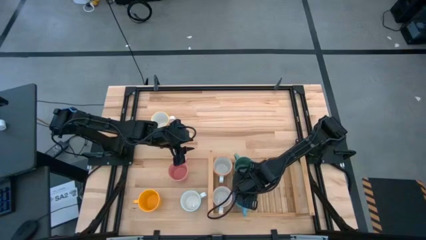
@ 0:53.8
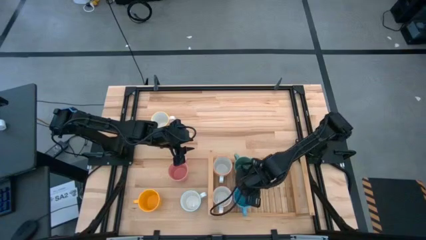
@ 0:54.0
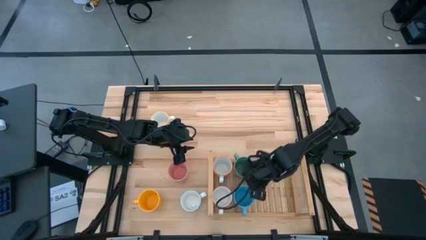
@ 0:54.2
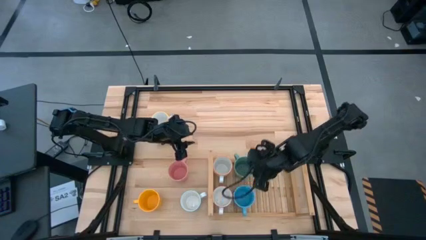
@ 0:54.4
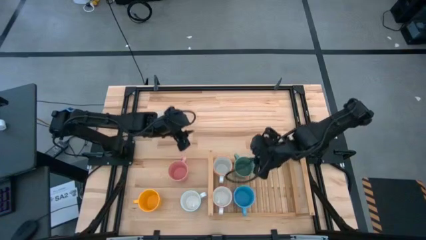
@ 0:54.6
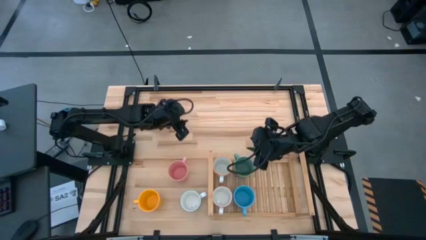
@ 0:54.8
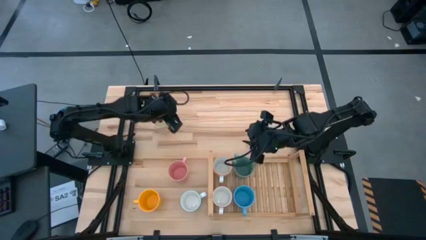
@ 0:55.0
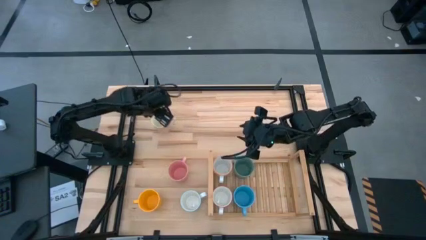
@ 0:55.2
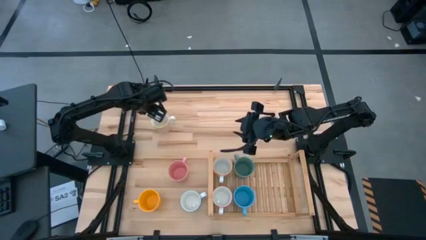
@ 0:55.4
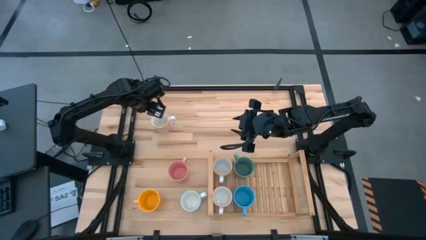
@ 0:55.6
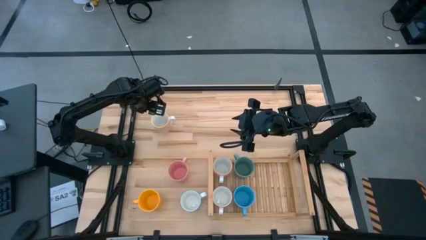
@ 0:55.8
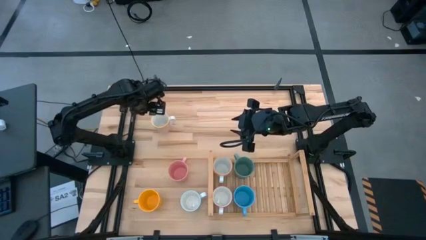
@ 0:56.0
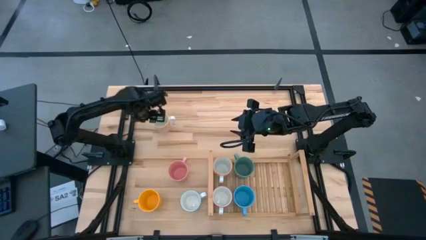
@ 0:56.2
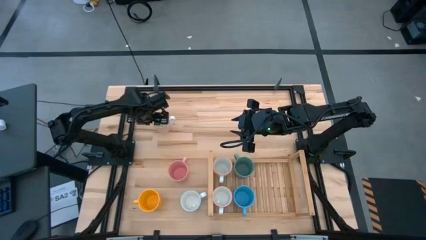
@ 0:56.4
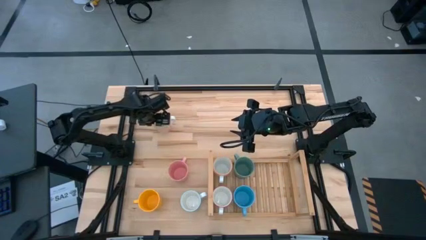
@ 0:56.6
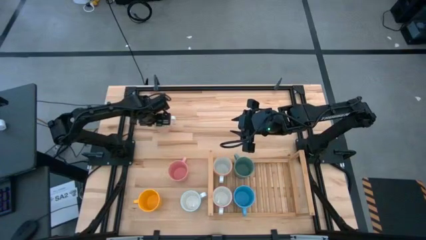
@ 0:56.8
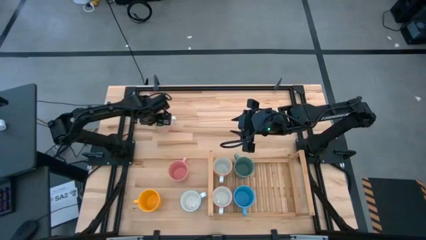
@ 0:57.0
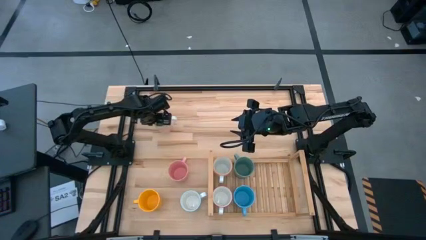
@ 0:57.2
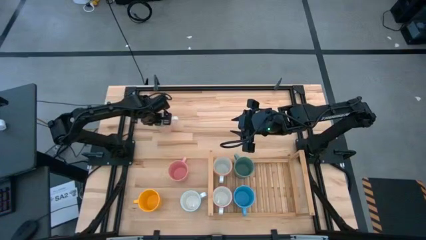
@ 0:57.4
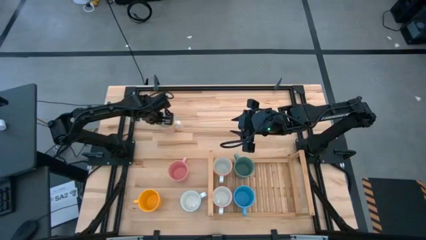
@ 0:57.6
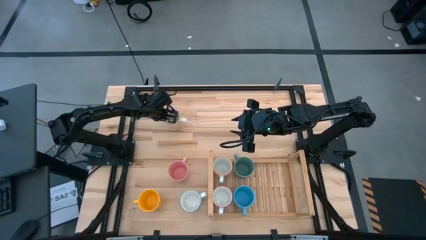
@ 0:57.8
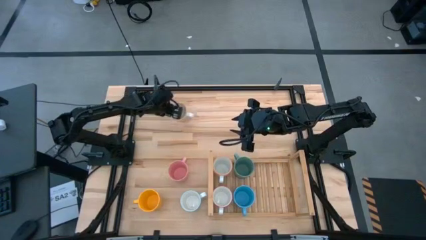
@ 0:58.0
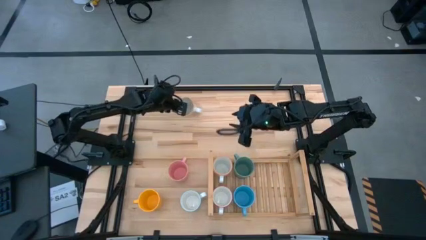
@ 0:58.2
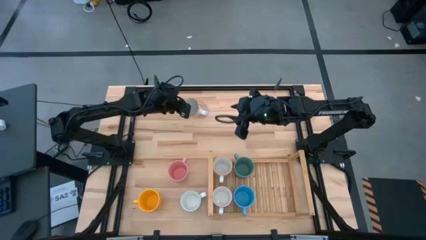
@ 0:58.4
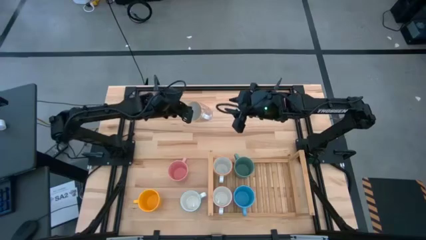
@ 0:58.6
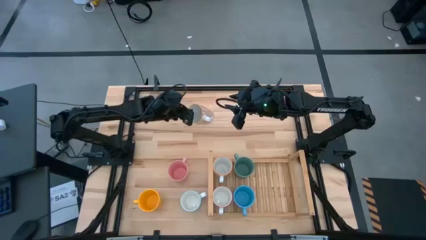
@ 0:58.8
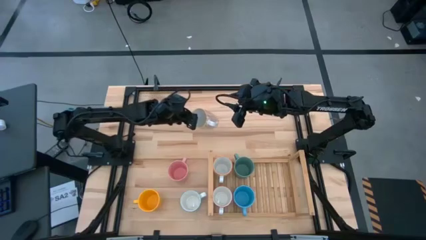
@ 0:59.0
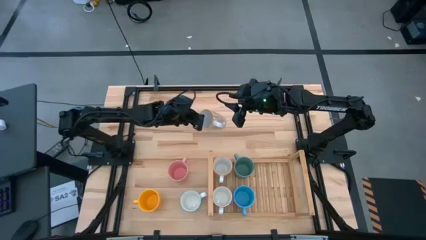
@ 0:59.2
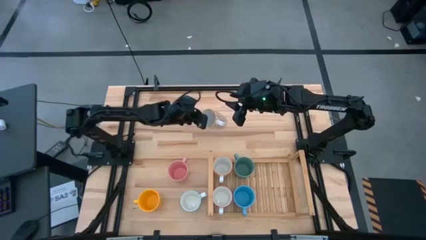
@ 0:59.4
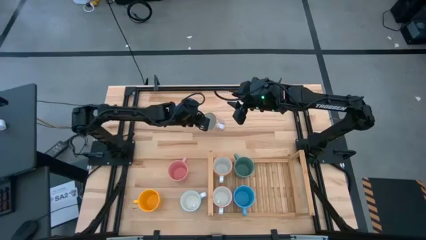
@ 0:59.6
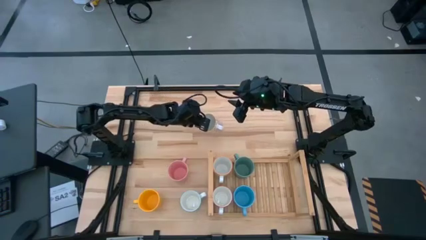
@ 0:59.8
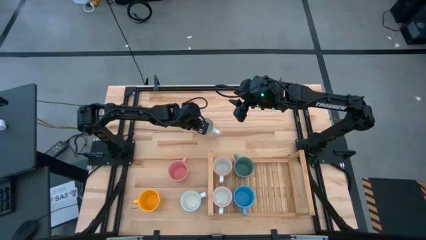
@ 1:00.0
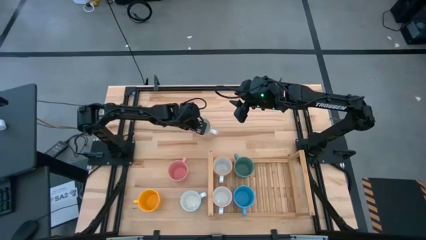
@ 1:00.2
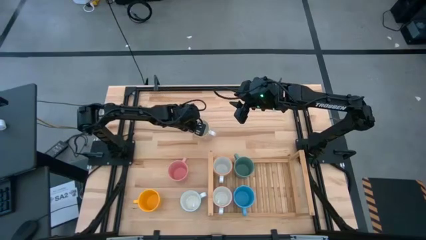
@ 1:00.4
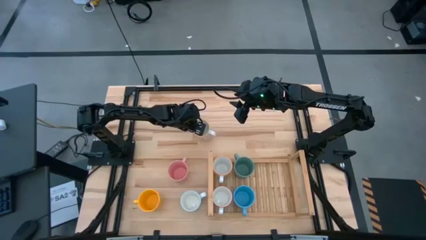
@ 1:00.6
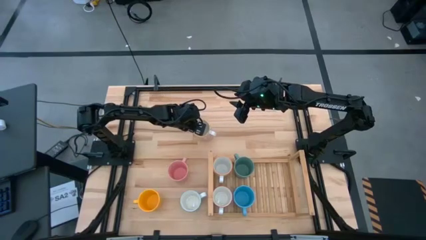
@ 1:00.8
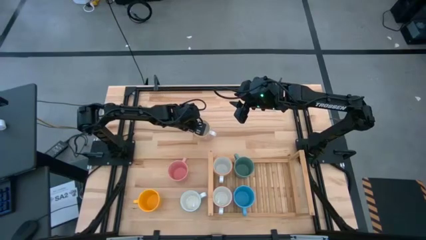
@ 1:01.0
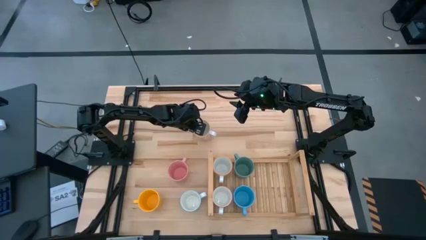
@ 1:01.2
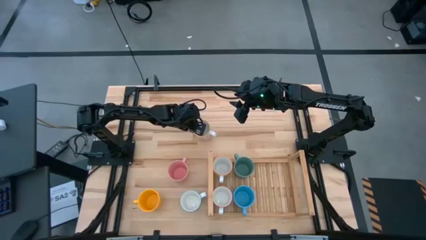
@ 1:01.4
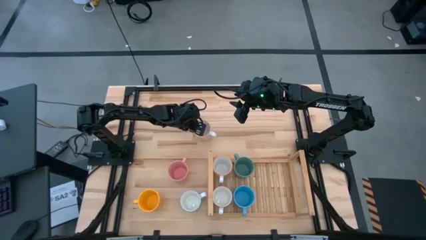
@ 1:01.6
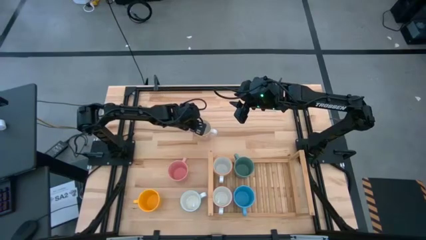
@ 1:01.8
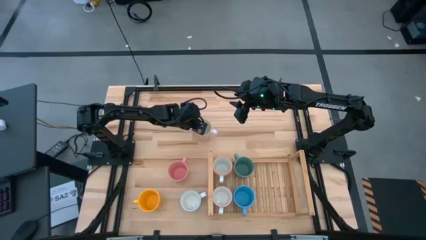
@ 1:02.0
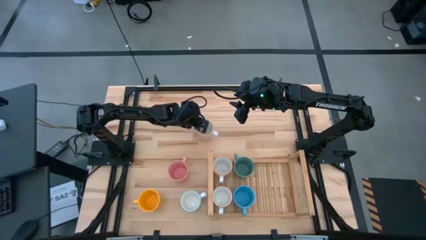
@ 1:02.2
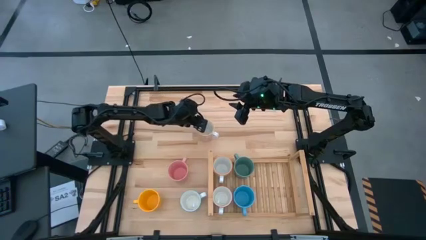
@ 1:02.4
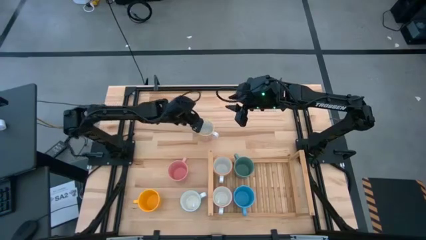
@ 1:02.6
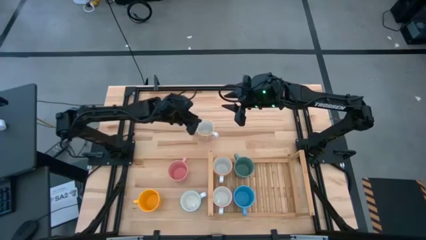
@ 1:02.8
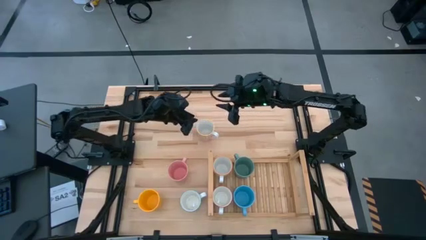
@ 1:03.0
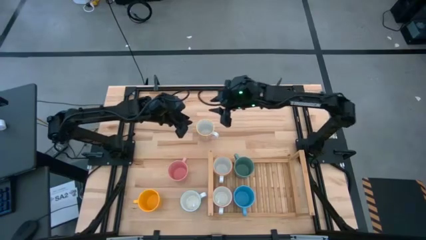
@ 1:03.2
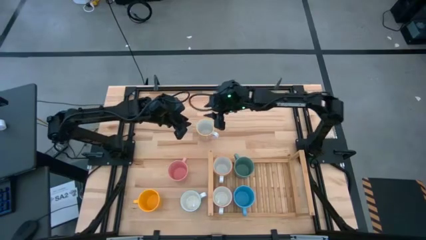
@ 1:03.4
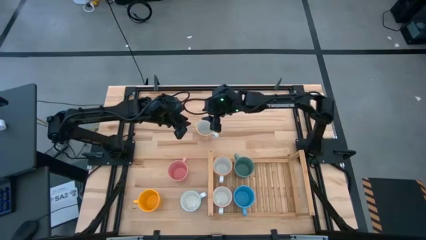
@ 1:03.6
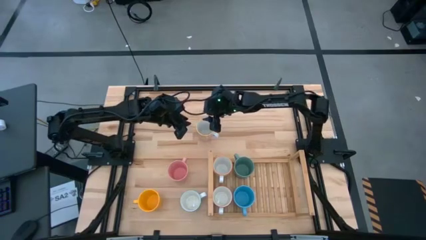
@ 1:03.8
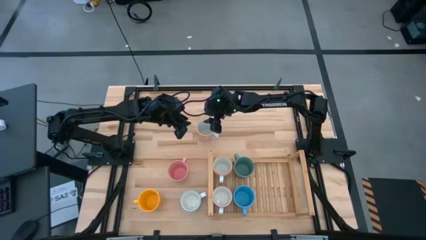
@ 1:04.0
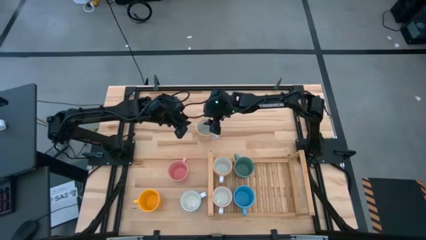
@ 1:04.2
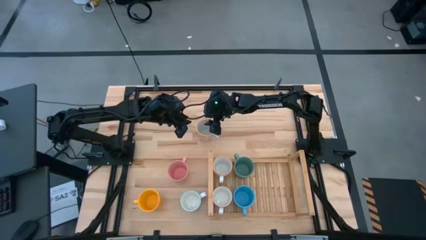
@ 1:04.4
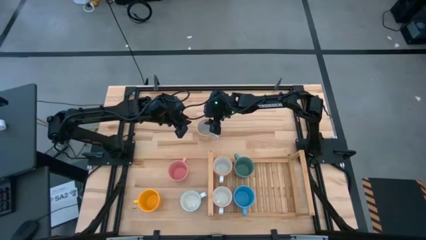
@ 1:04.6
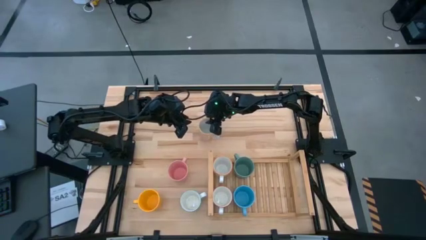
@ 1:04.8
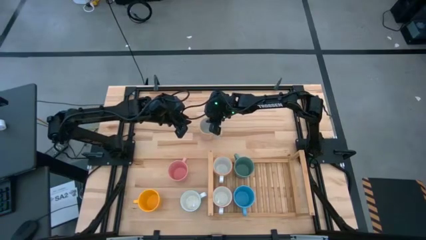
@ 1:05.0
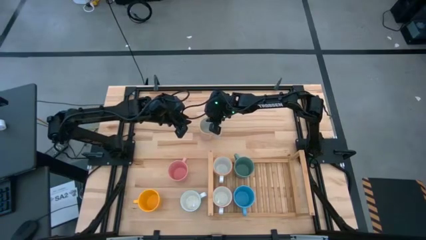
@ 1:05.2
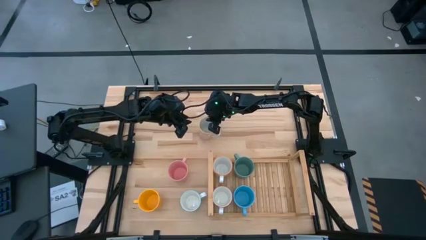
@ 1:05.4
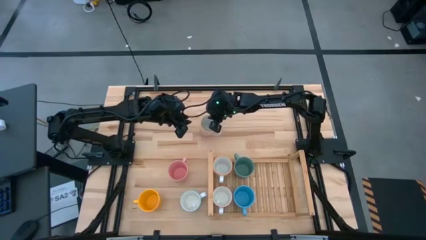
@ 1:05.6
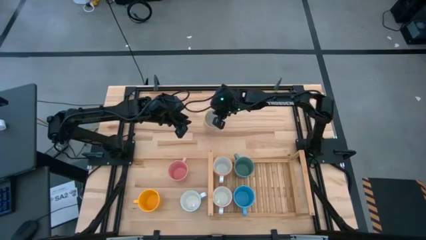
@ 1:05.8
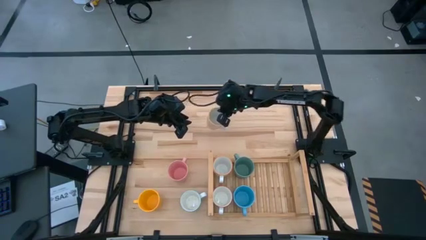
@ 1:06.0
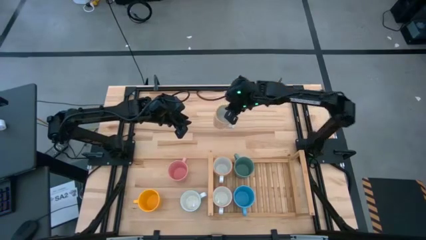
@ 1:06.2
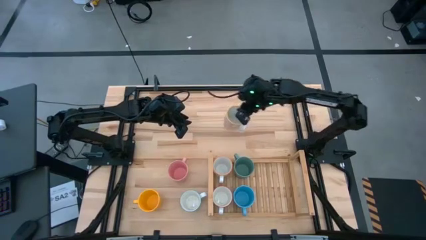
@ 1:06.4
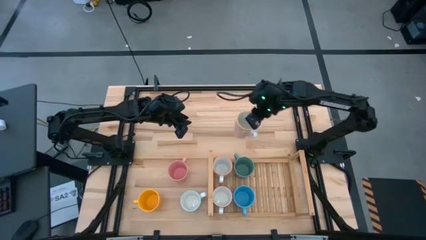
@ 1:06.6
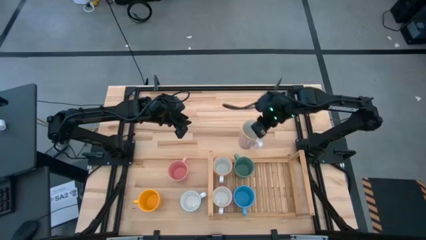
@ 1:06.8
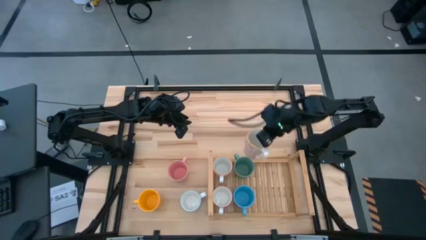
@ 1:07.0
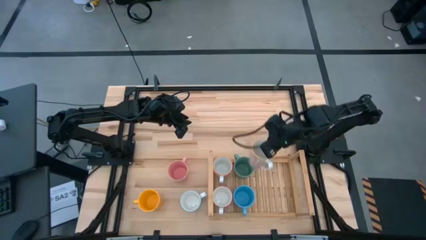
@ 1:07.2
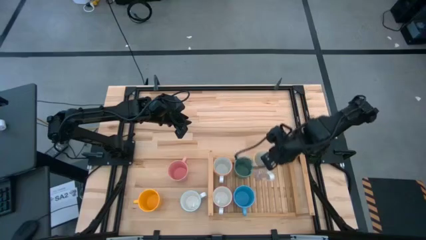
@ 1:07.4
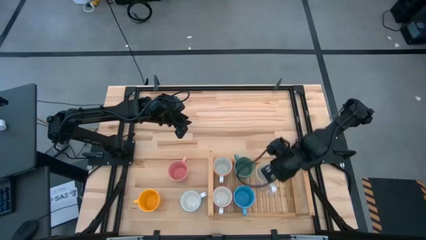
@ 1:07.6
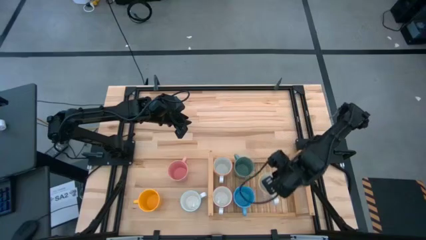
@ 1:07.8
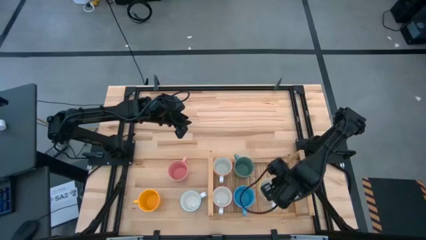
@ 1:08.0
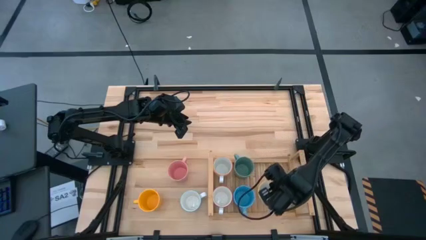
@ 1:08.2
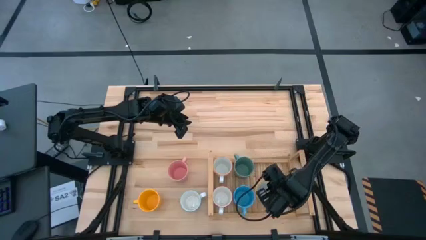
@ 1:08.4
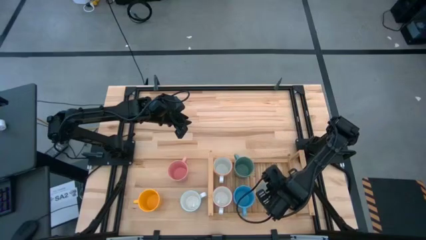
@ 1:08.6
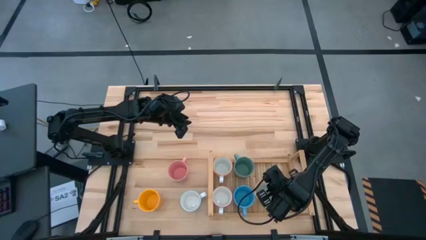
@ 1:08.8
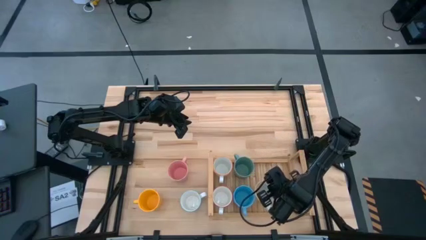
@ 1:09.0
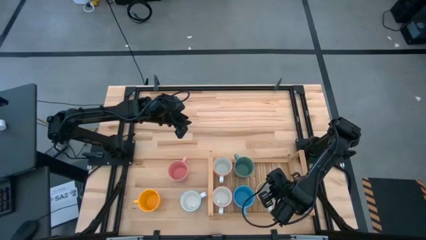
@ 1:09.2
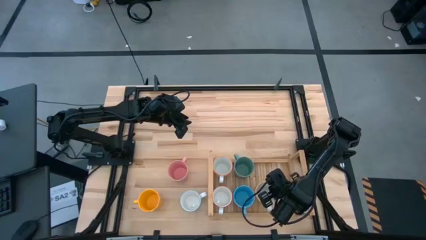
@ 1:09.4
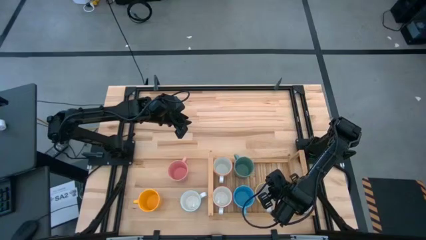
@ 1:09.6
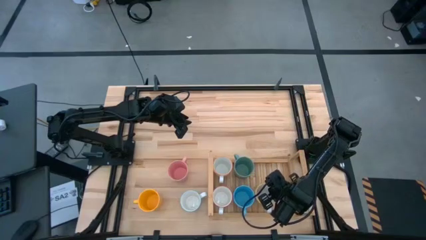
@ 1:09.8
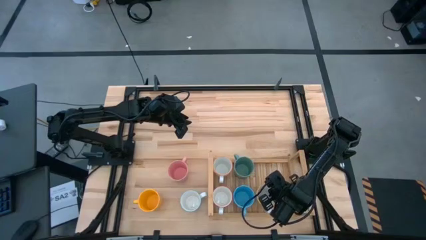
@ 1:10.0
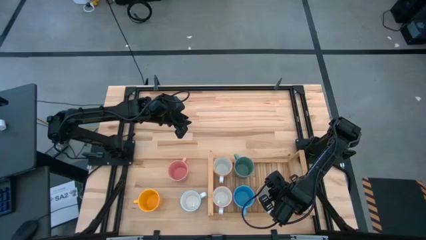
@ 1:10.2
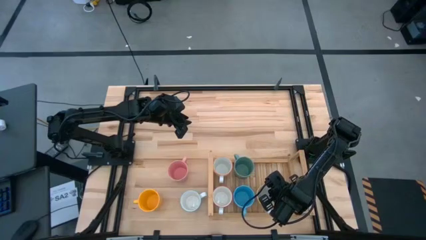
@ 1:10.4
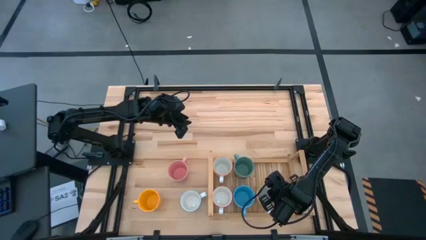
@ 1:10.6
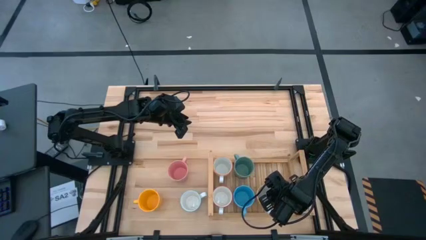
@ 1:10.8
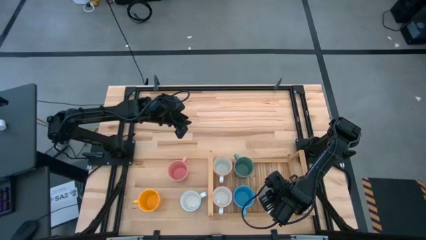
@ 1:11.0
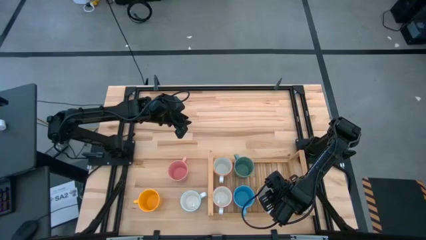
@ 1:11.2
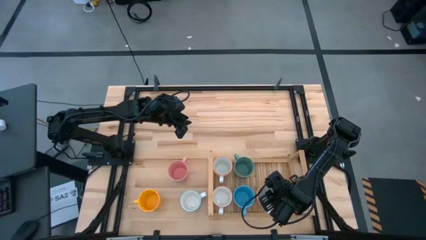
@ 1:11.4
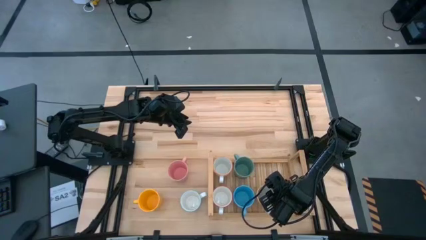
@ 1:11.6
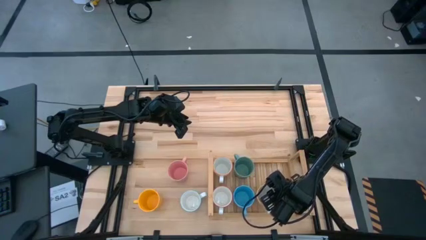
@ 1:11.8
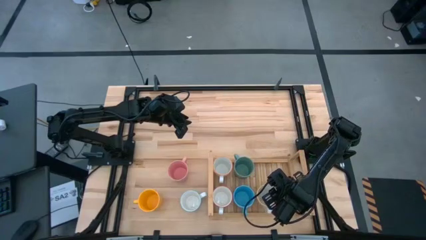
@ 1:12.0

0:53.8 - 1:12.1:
Task: Place coffee mugs
Put the yellow patterned mug on the shelf
